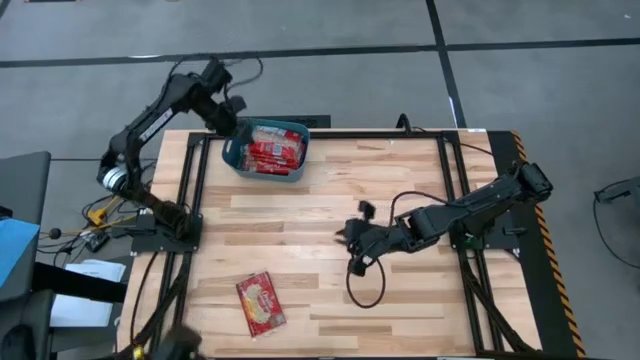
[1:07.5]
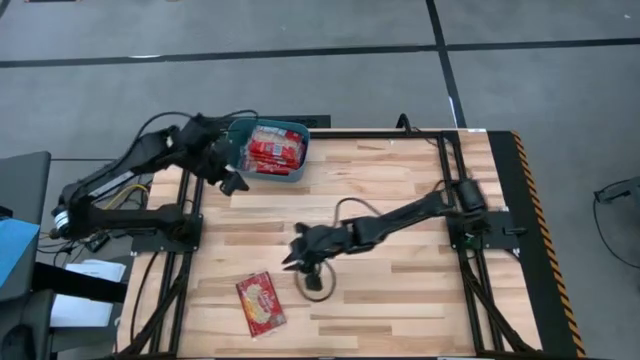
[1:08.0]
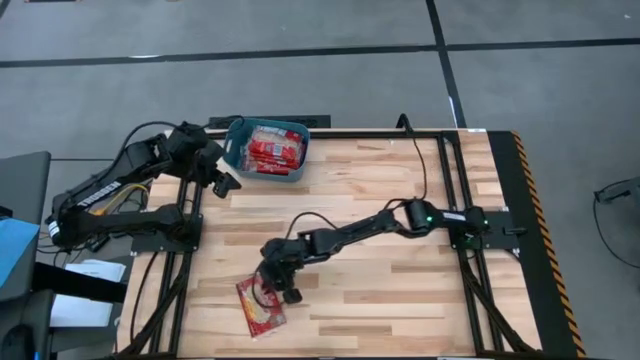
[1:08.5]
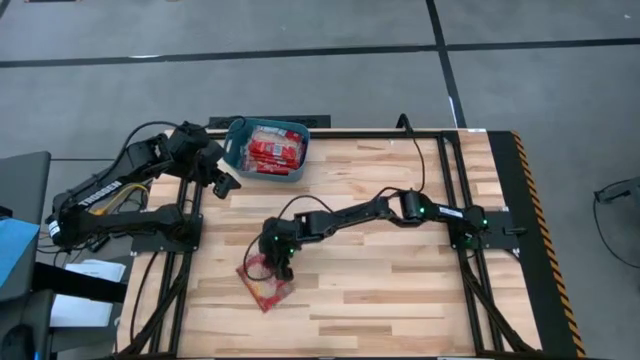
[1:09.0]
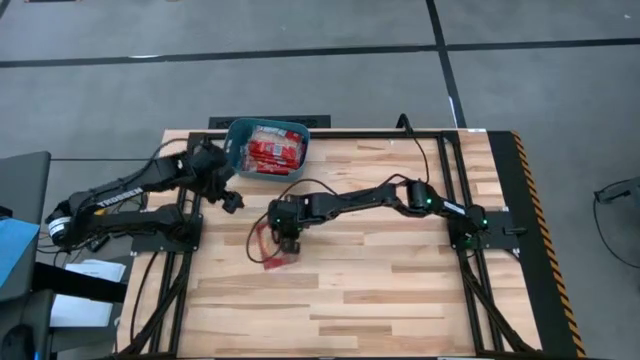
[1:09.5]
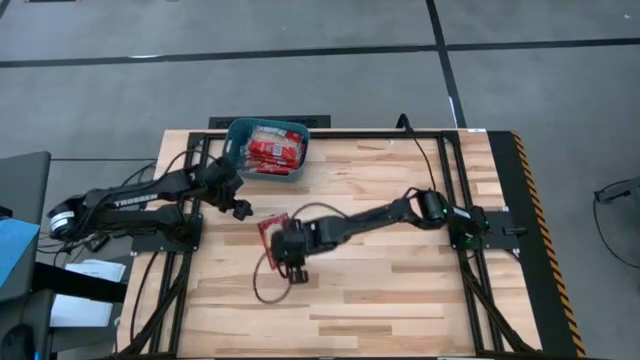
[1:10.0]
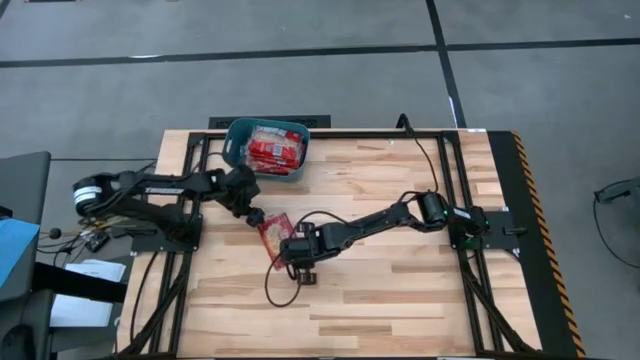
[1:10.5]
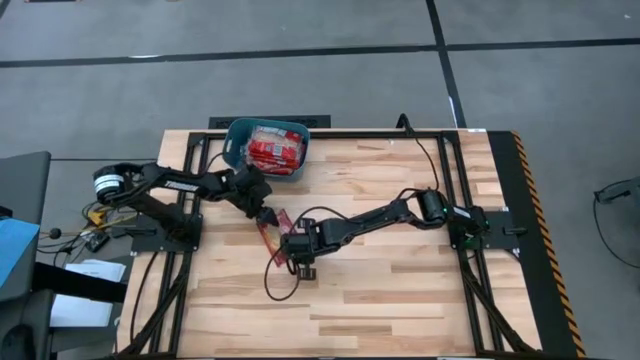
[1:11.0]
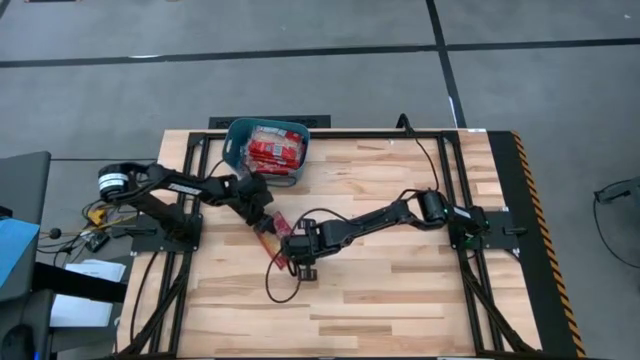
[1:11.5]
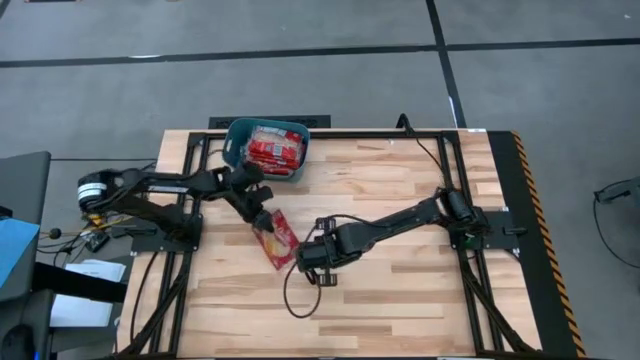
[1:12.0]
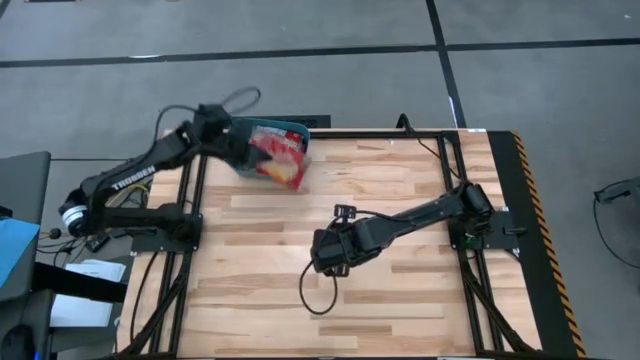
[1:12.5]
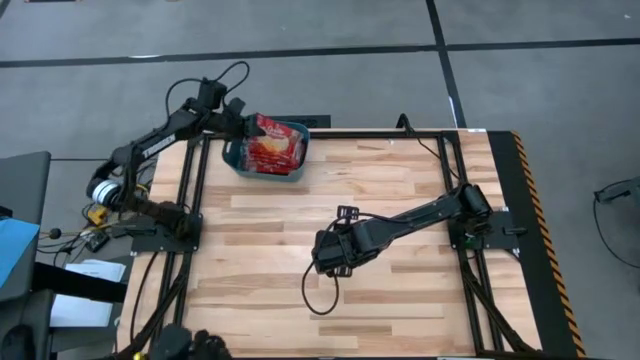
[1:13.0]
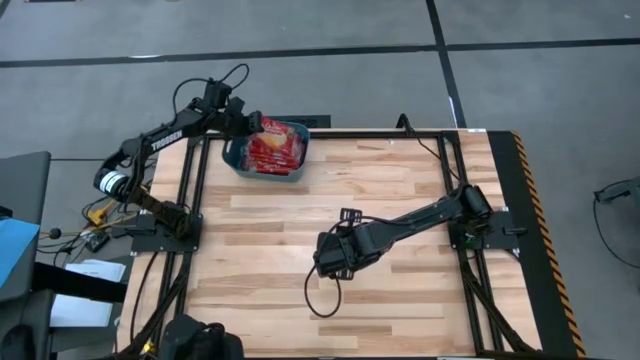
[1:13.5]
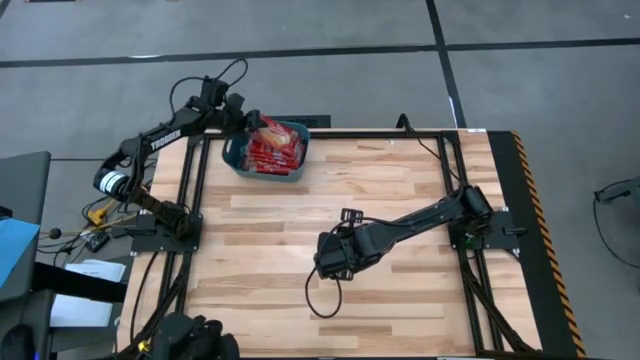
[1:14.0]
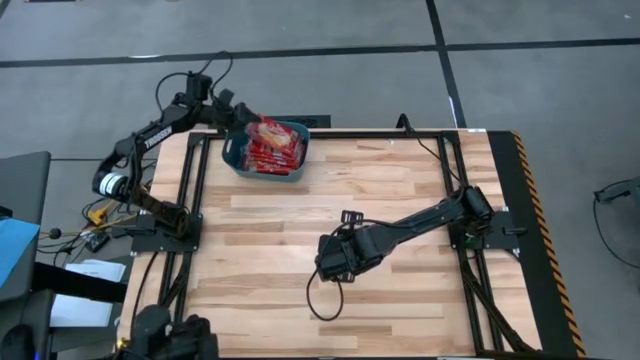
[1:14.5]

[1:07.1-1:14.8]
Task: Sort popcorn bags into baskets
Put the red popcorn bag into the blue bin

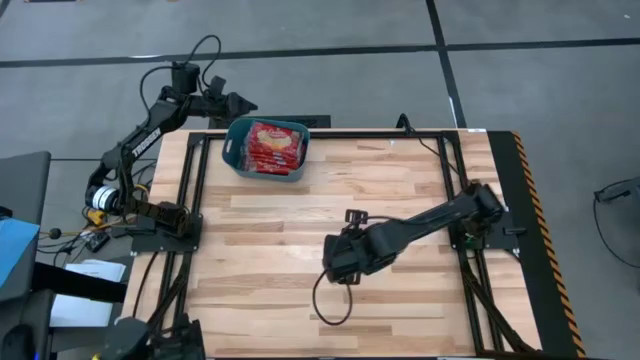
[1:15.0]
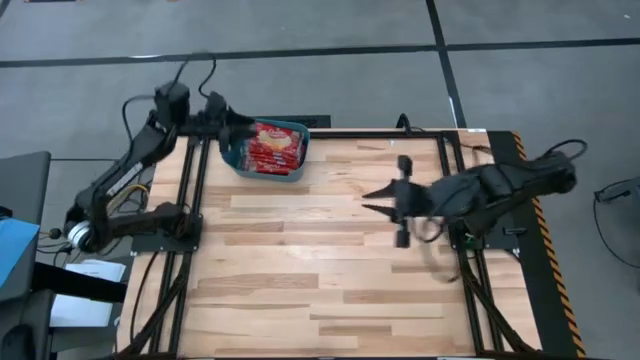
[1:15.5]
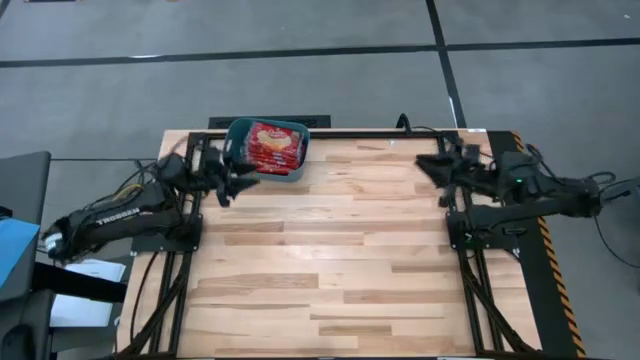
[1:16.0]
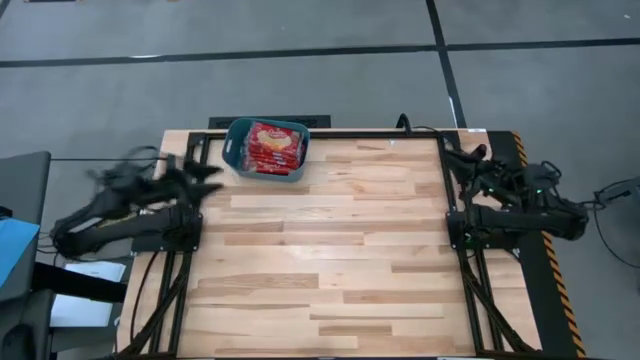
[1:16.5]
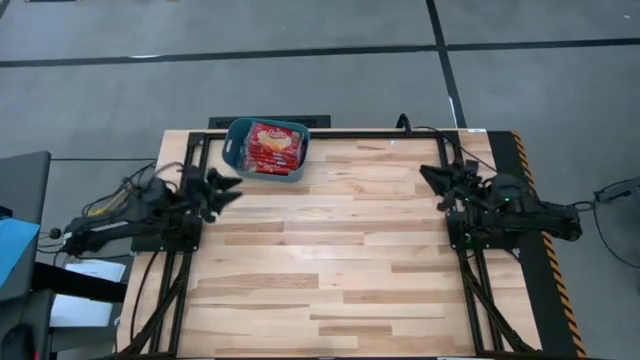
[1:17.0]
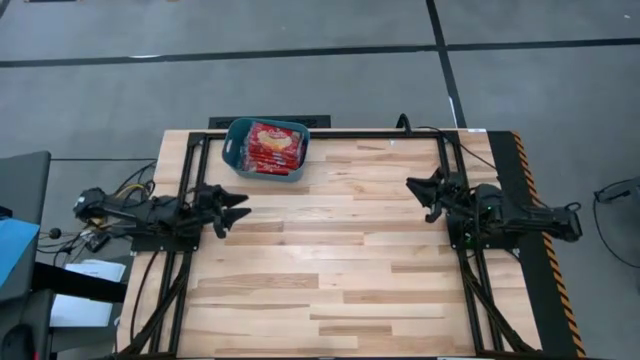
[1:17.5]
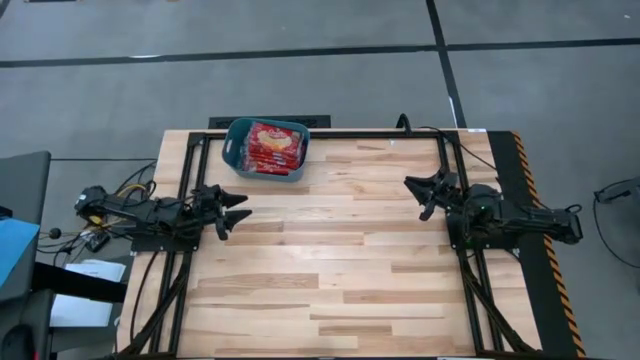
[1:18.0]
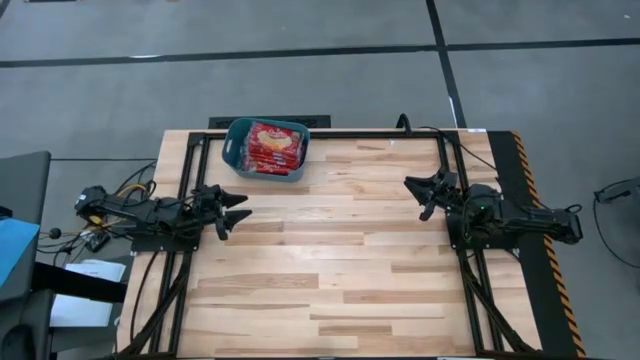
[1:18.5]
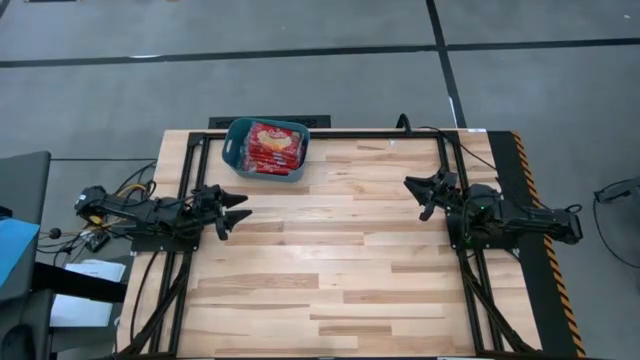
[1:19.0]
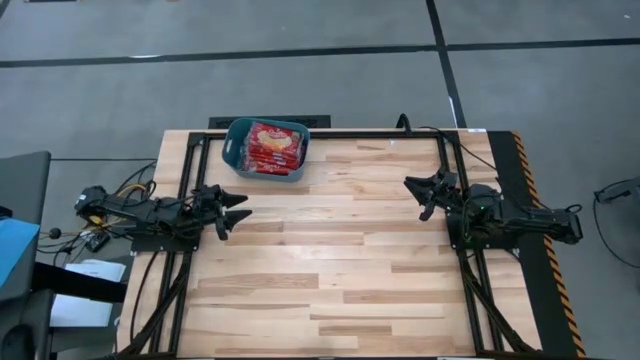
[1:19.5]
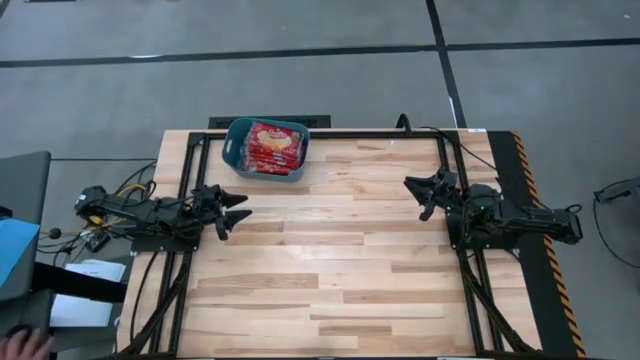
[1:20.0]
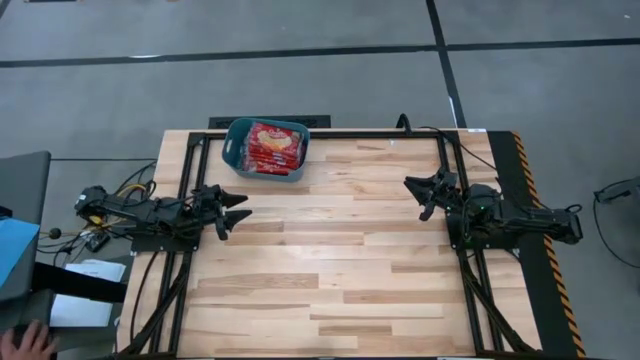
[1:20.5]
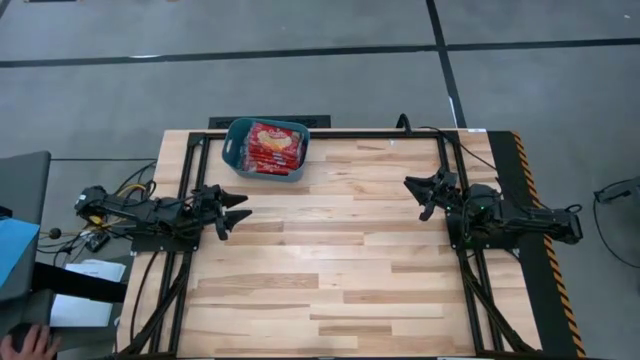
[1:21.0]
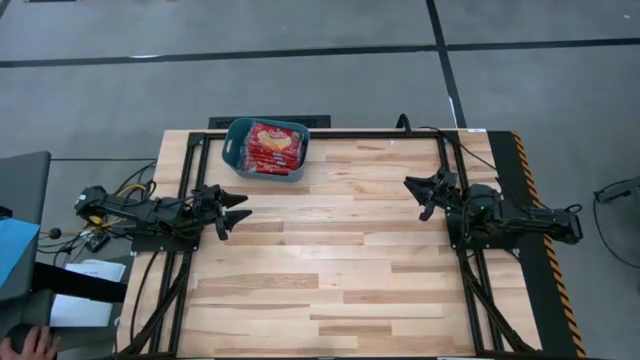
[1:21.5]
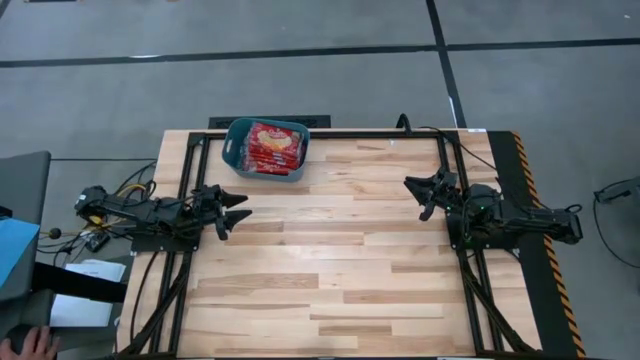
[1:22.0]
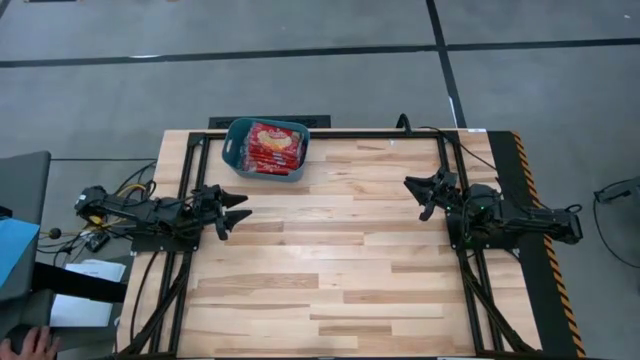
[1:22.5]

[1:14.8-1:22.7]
Return to Home Position

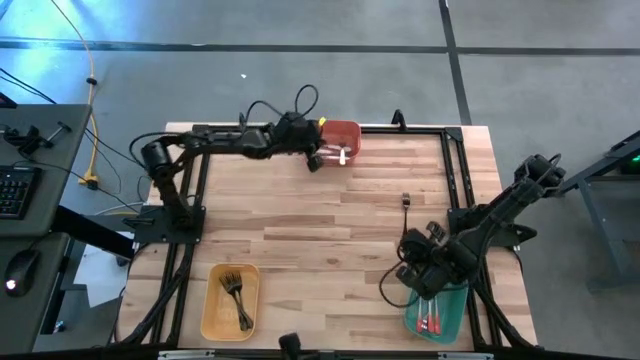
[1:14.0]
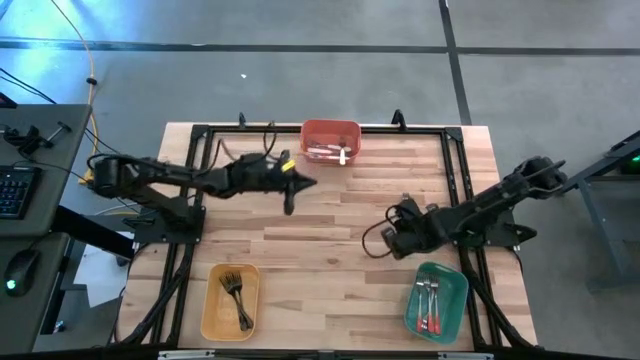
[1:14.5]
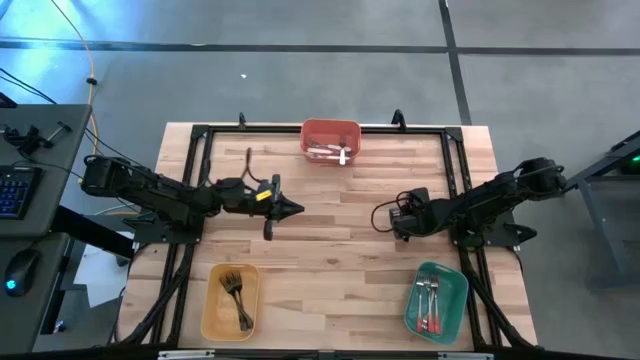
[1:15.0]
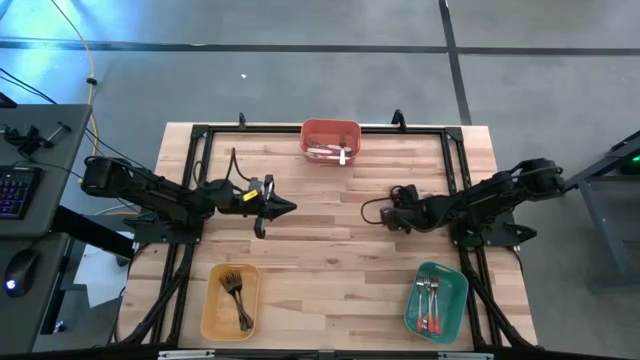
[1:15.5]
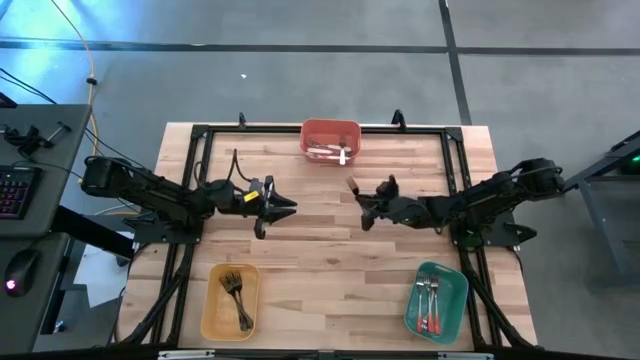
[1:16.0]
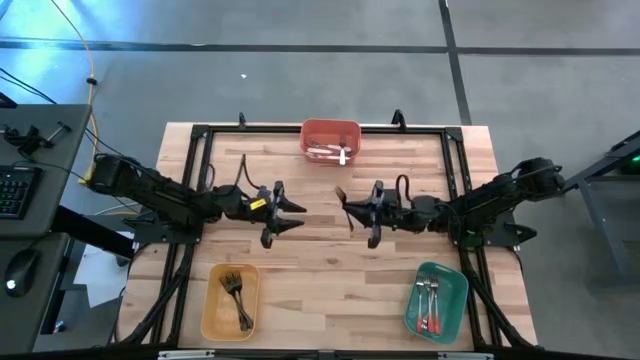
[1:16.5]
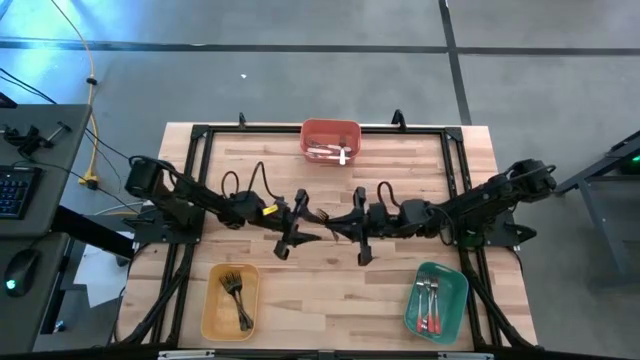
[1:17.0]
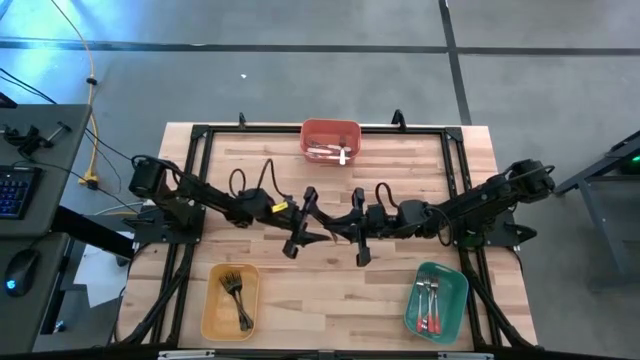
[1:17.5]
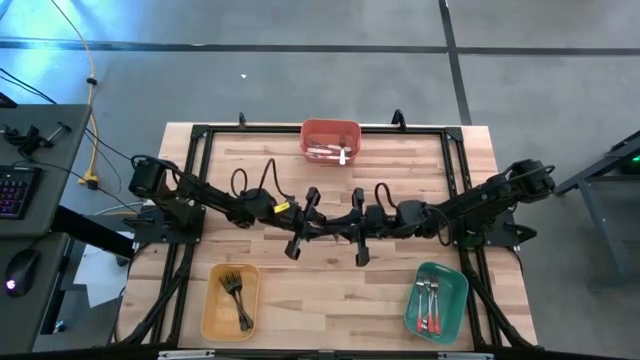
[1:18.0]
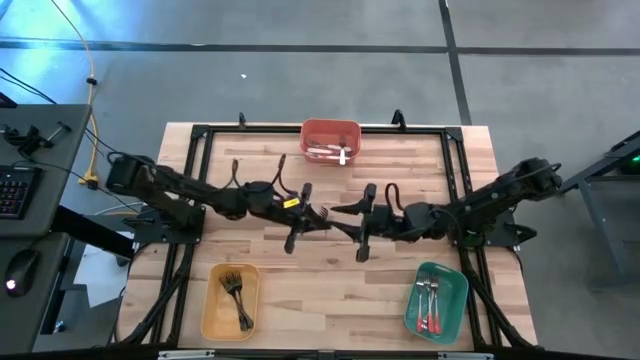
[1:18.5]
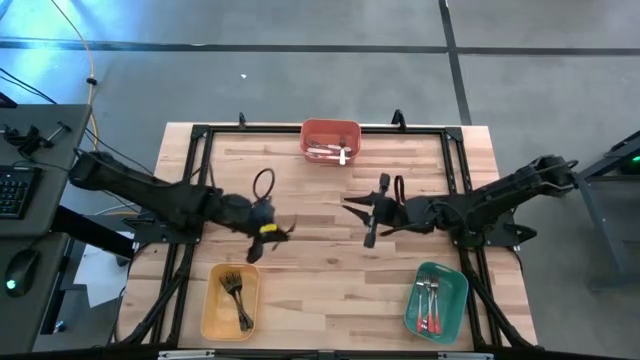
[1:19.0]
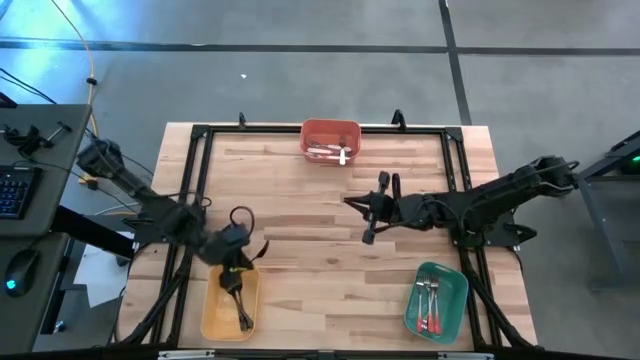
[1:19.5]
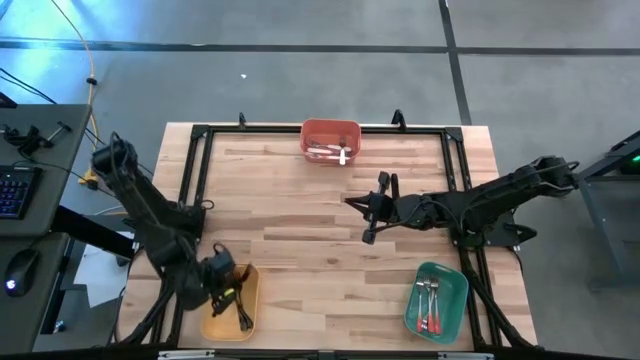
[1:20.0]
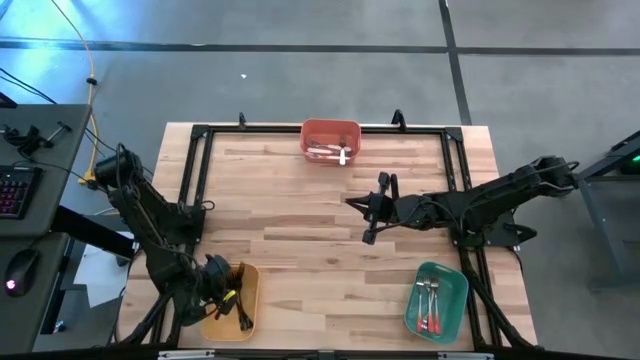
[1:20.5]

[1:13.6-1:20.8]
Task: Sort silverware by color (type)
Put the black fork into the yellow bin
